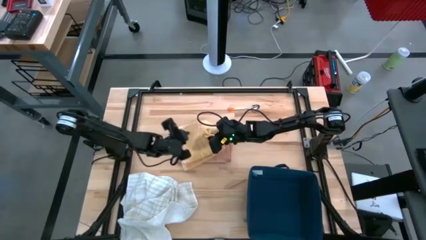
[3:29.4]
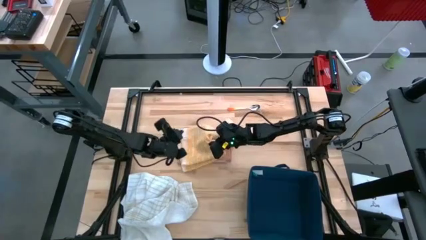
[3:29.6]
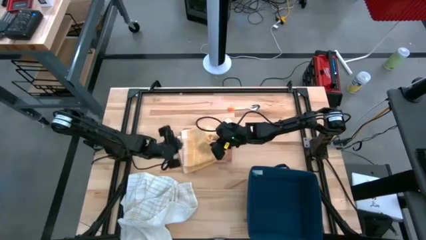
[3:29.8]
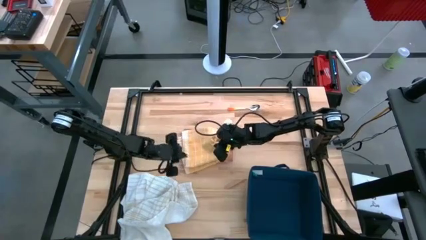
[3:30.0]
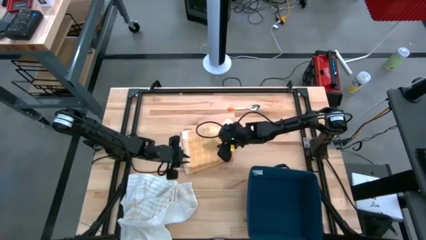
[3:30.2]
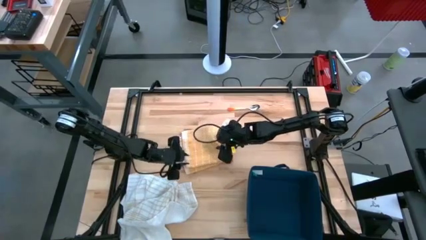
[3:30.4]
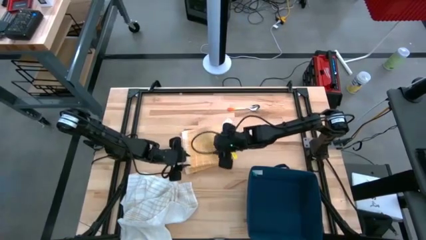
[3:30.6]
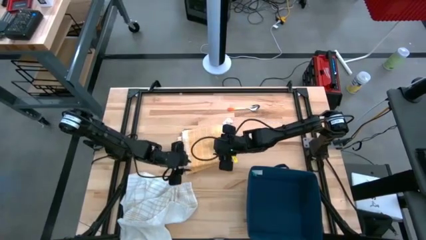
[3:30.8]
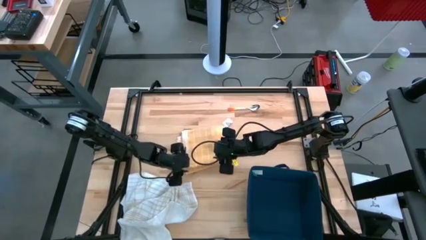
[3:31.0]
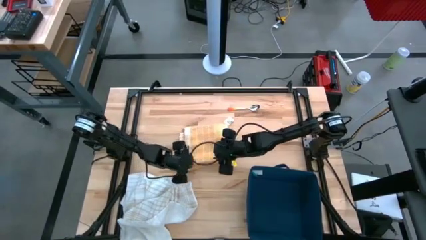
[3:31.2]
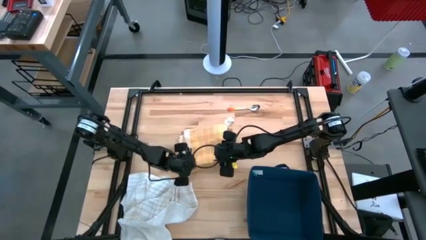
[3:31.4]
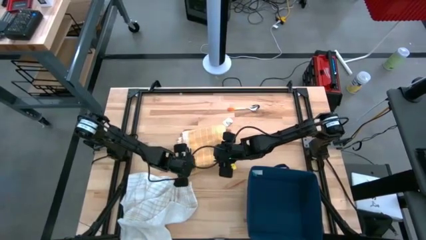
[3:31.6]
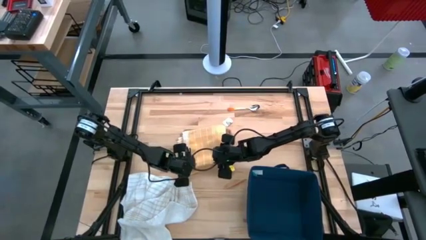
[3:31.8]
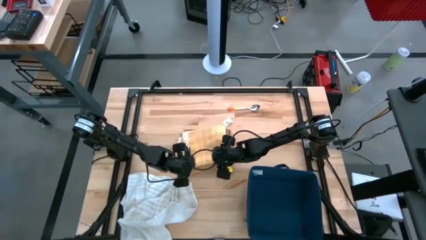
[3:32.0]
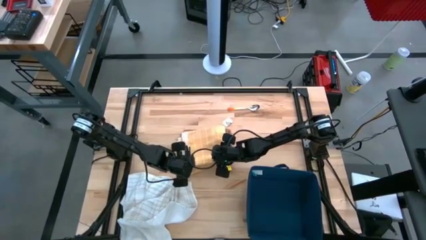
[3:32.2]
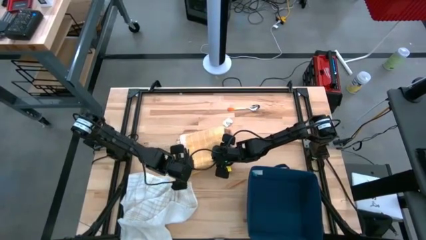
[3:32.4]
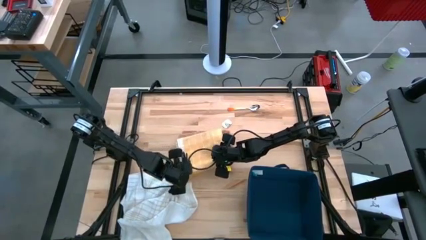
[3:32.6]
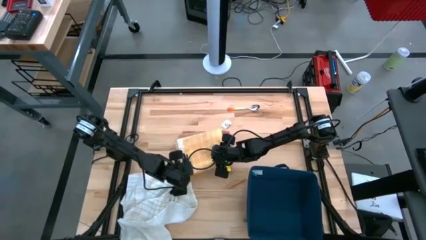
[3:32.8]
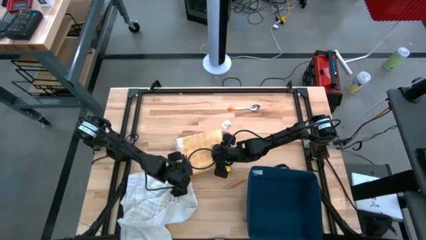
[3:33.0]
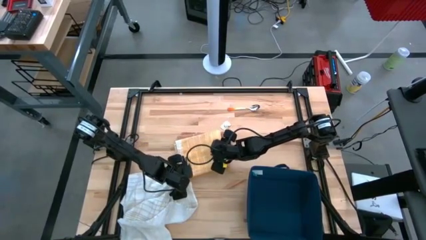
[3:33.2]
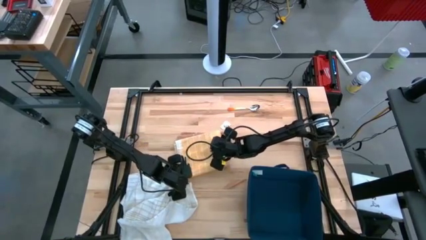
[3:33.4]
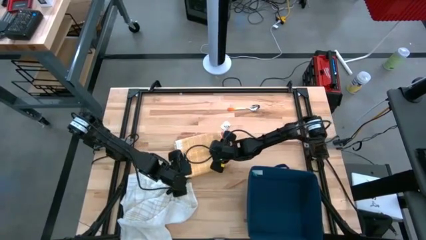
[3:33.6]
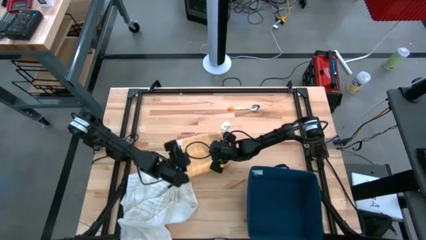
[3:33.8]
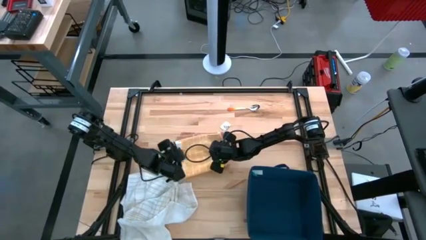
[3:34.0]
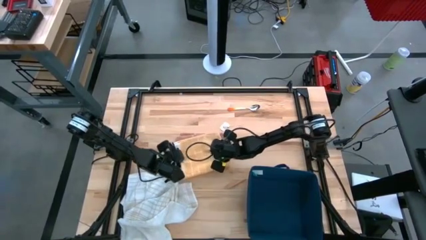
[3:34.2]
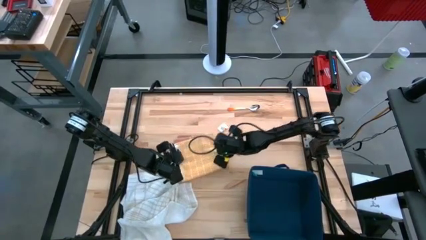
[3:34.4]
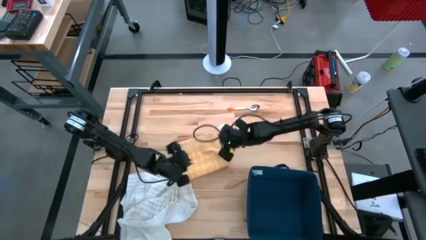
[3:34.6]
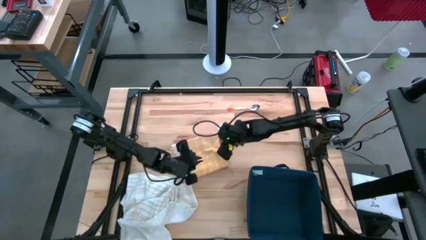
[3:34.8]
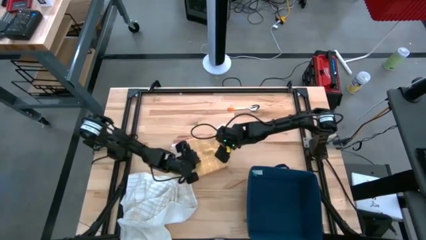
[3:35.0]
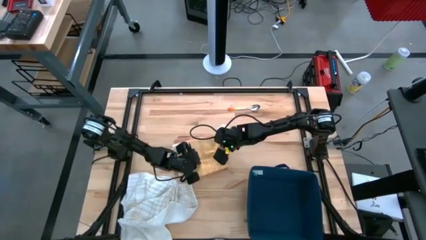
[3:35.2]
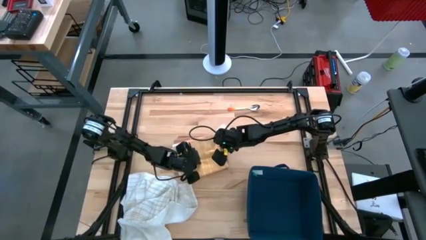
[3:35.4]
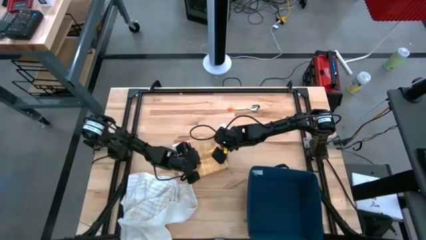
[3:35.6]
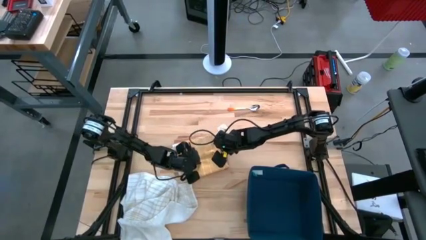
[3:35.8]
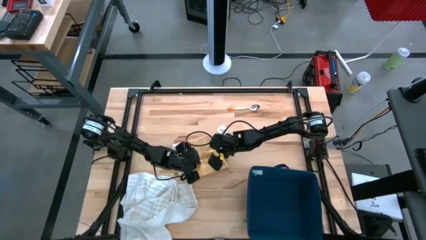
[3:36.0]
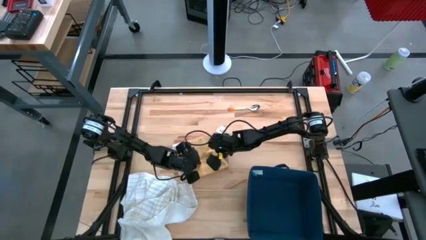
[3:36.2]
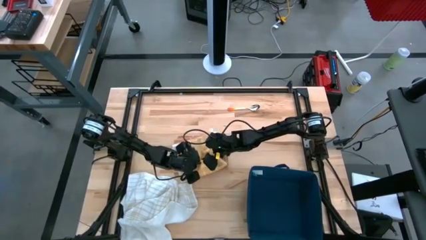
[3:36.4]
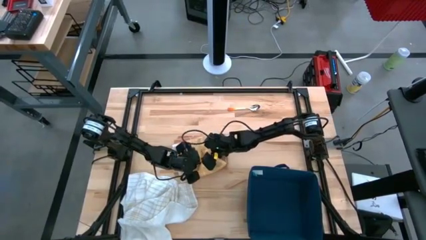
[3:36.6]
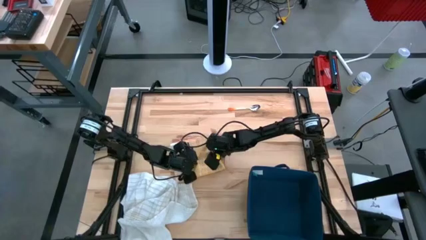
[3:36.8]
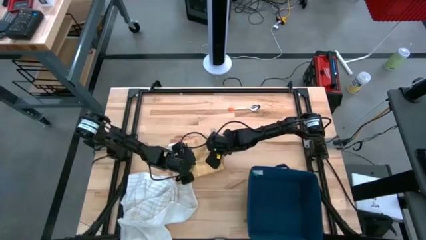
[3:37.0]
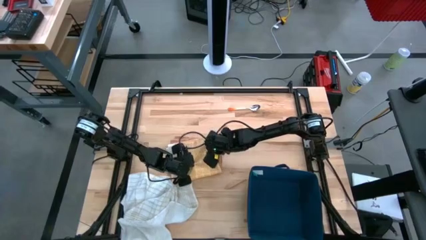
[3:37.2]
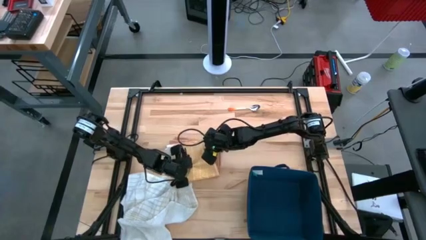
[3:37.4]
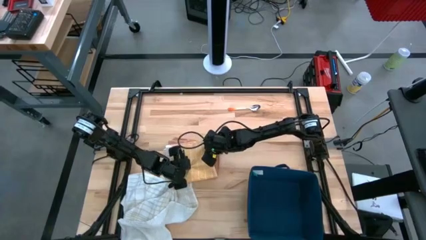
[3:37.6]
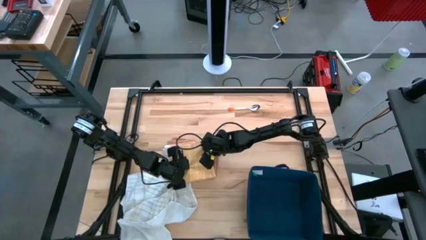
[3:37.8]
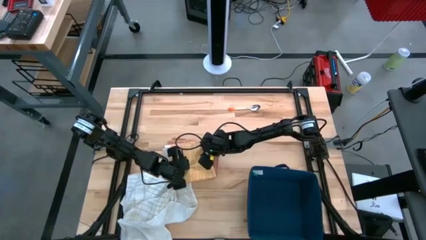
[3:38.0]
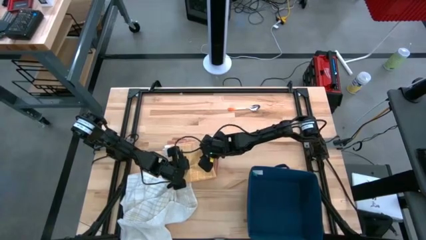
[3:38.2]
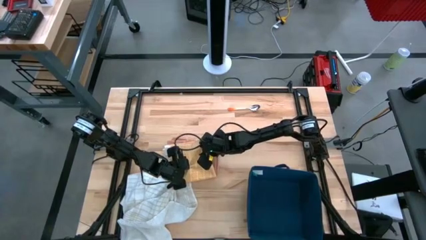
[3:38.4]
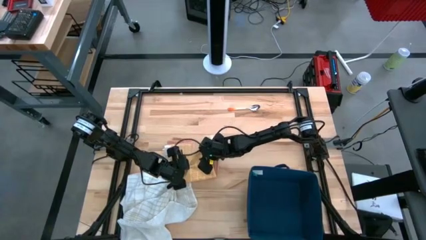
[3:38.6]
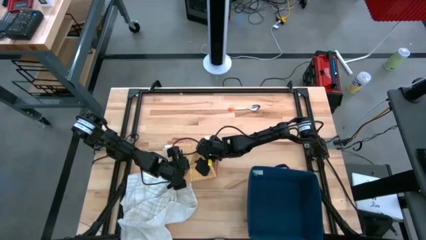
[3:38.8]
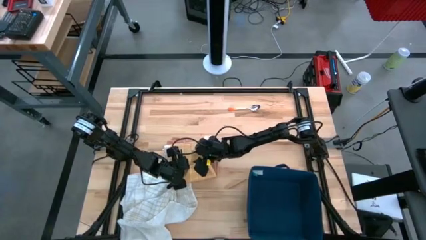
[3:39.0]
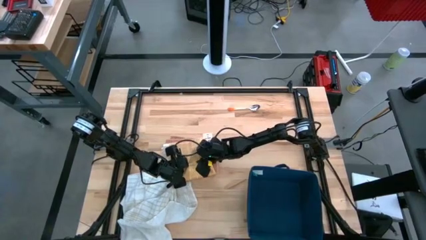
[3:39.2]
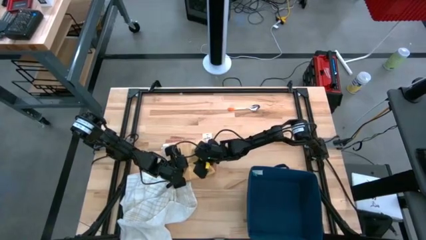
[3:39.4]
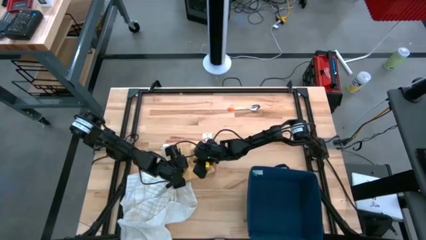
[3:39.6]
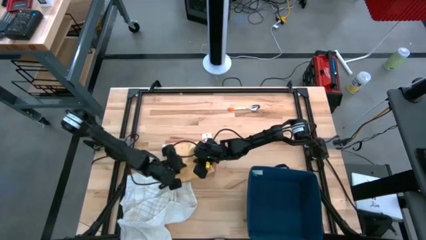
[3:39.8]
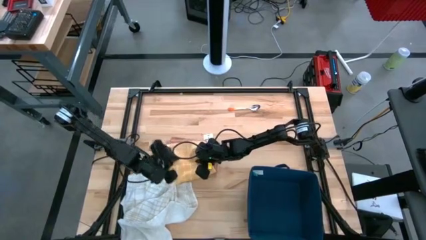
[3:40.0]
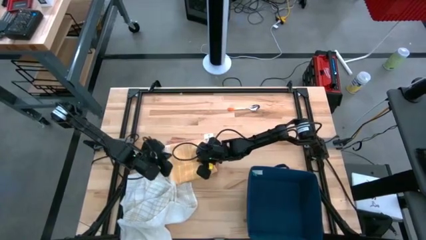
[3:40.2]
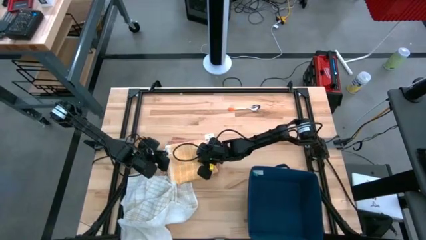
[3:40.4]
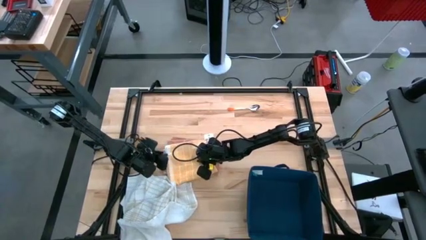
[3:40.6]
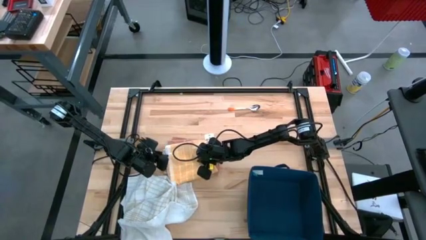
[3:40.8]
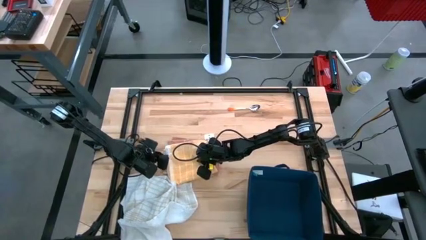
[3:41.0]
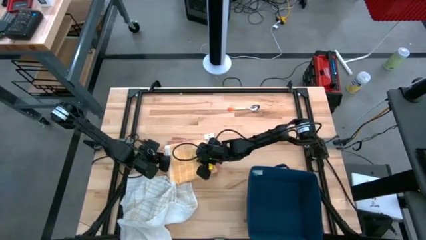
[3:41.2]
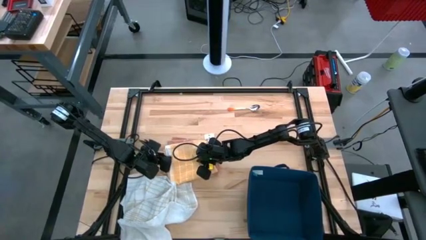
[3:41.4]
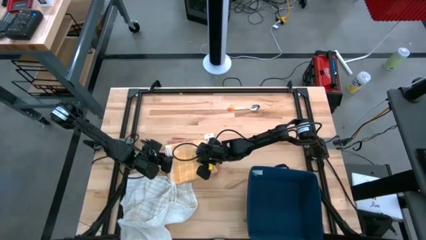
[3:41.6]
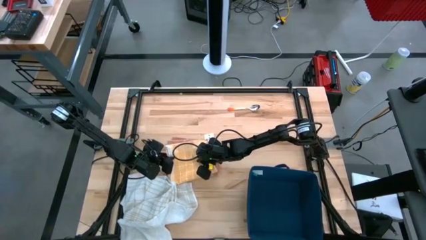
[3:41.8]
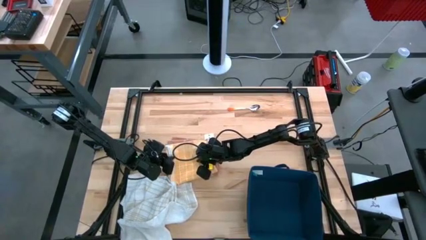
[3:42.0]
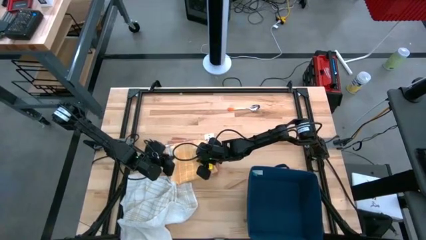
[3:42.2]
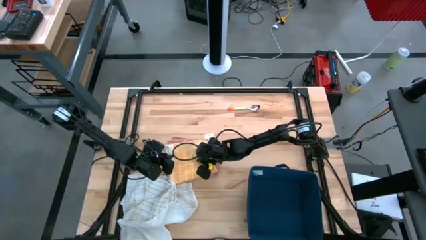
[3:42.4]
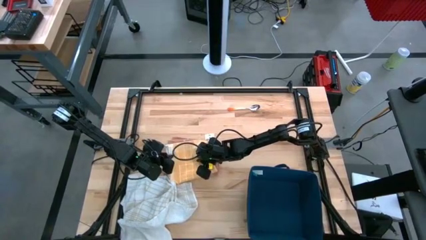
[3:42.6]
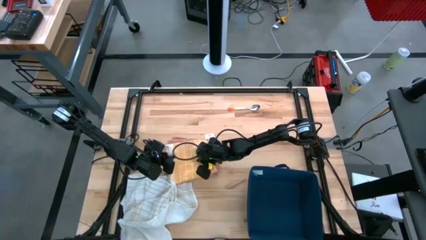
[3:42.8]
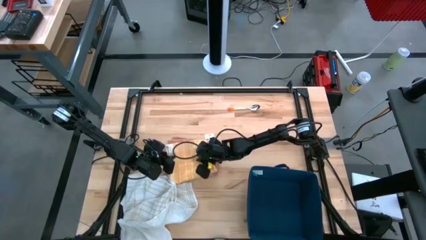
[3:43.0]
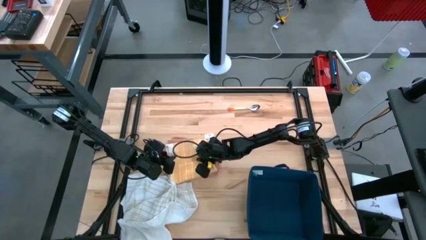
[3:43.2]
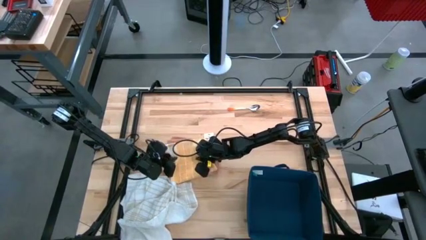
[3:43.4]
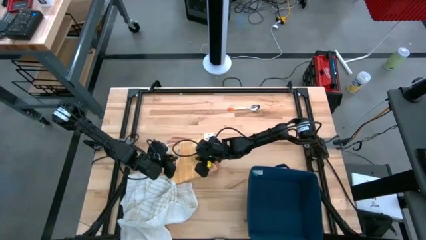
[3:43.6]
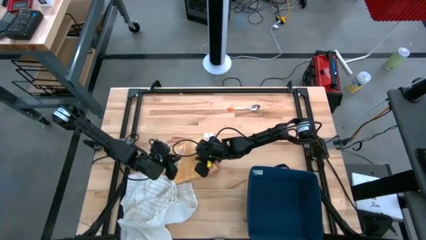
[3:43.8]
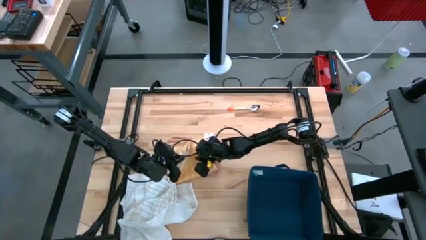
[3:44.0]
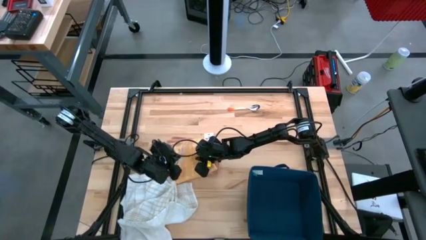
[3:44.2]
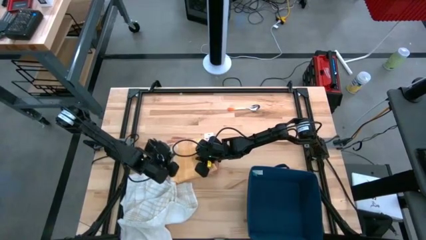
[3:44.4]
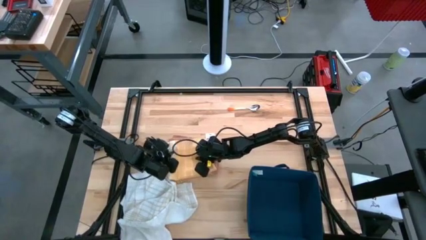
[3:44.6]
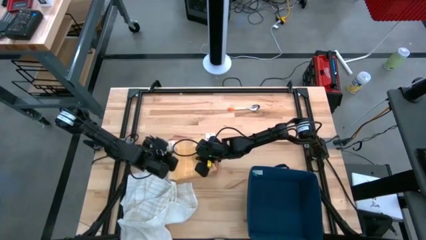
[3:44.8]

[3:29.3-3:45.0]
Task: Fold towel
Stack the folded yellow towel on top of the folded brown towel
